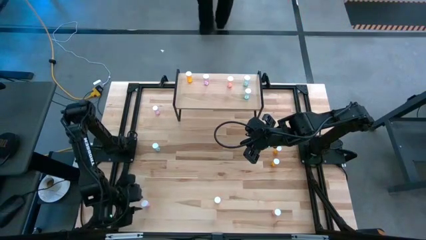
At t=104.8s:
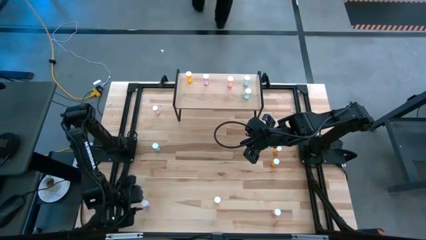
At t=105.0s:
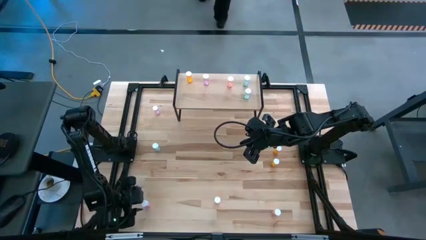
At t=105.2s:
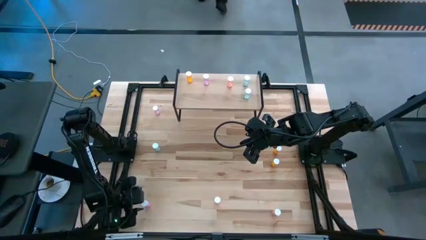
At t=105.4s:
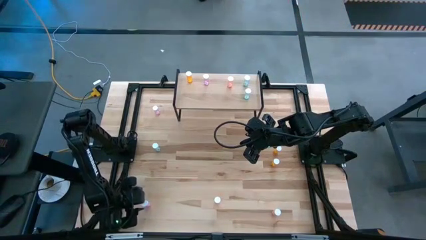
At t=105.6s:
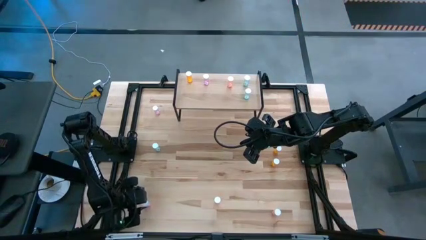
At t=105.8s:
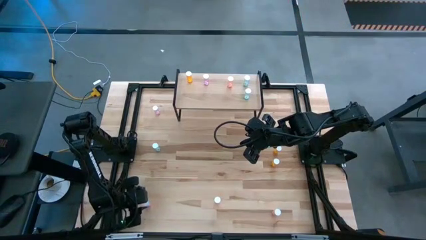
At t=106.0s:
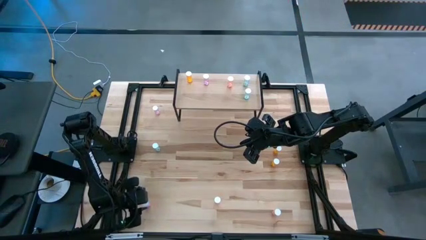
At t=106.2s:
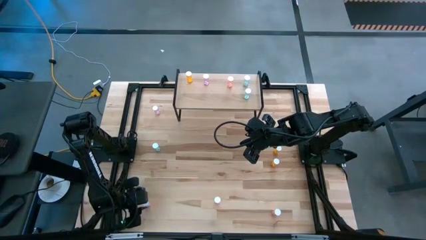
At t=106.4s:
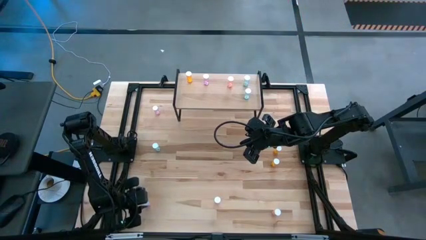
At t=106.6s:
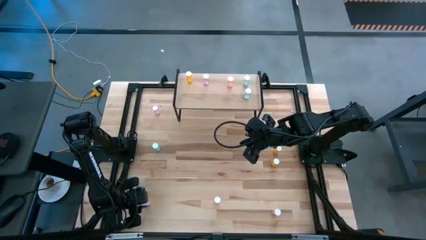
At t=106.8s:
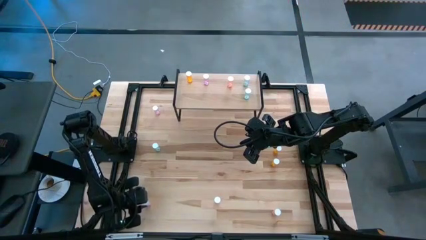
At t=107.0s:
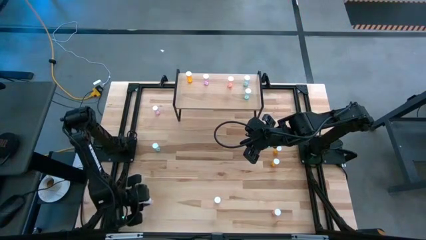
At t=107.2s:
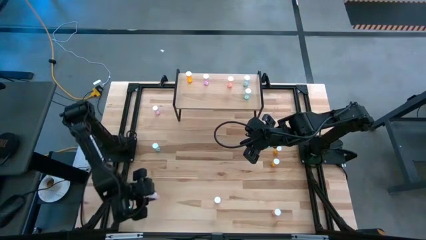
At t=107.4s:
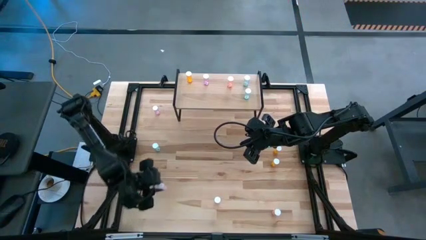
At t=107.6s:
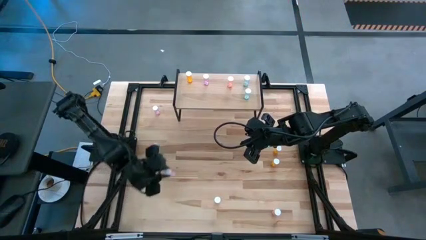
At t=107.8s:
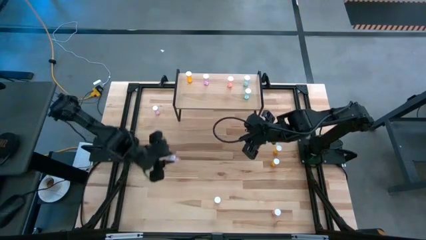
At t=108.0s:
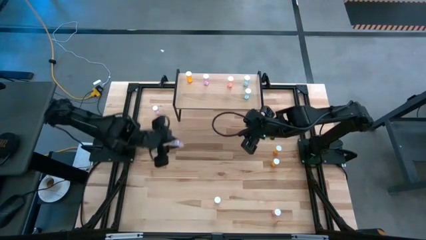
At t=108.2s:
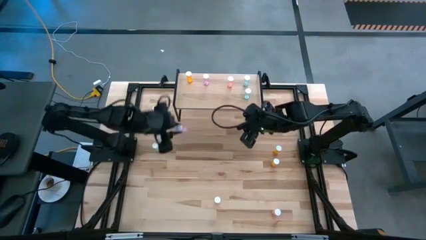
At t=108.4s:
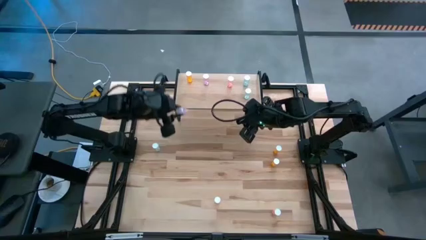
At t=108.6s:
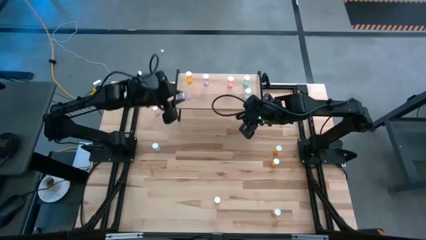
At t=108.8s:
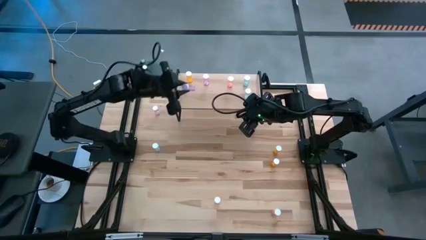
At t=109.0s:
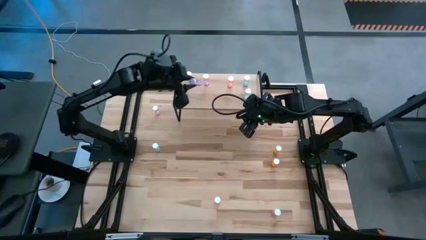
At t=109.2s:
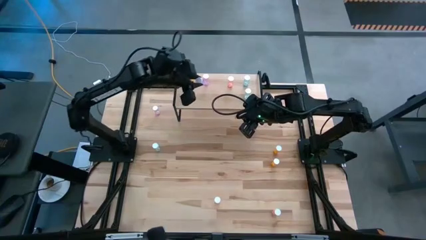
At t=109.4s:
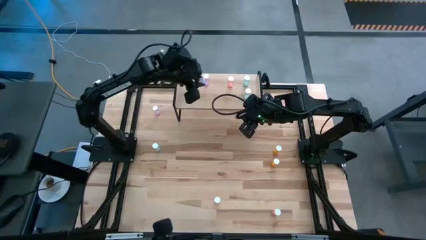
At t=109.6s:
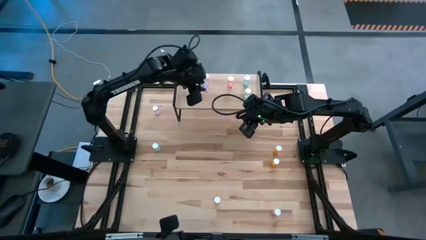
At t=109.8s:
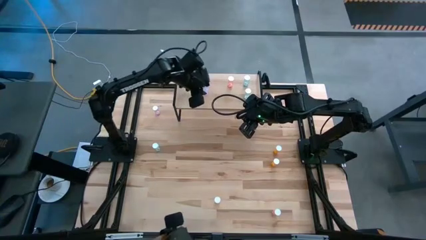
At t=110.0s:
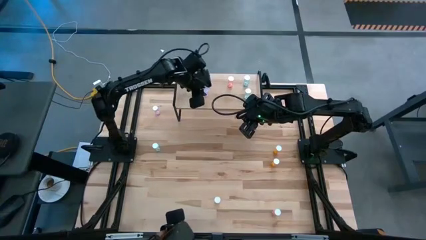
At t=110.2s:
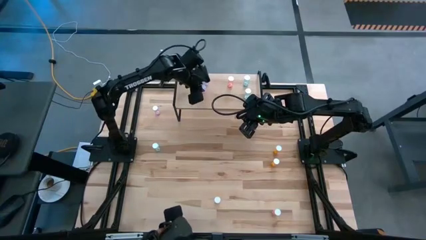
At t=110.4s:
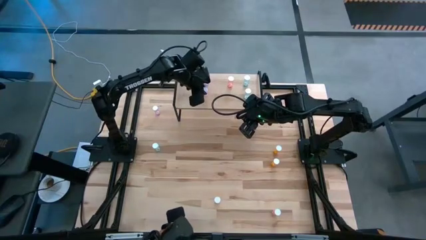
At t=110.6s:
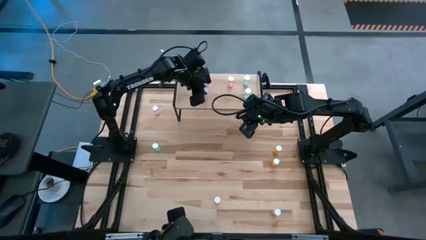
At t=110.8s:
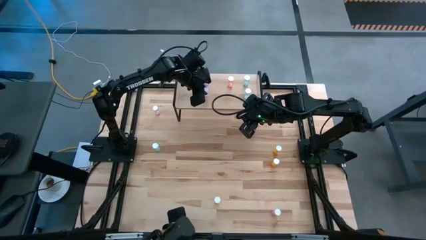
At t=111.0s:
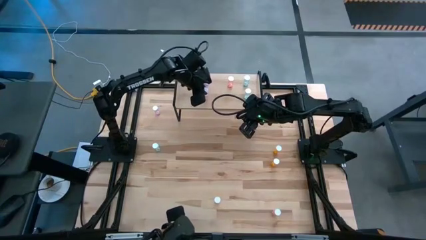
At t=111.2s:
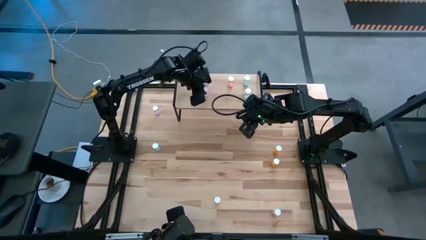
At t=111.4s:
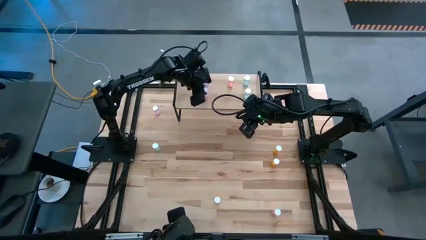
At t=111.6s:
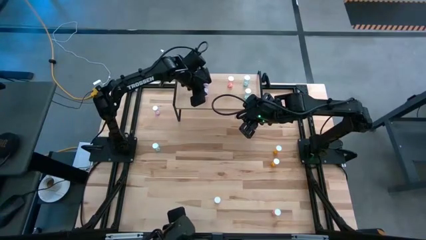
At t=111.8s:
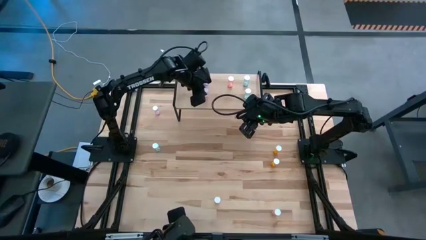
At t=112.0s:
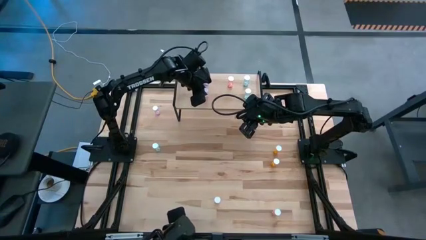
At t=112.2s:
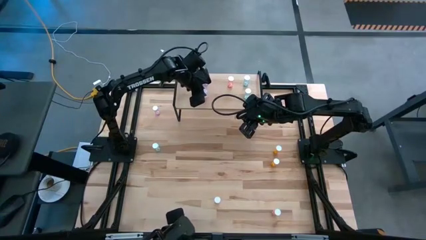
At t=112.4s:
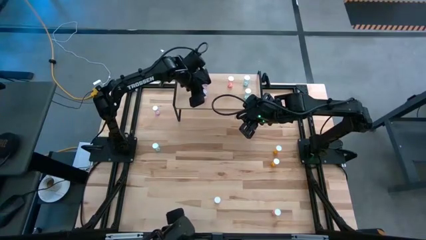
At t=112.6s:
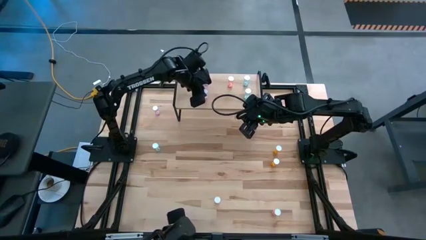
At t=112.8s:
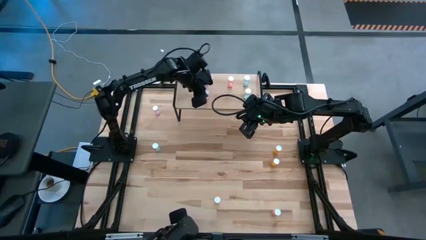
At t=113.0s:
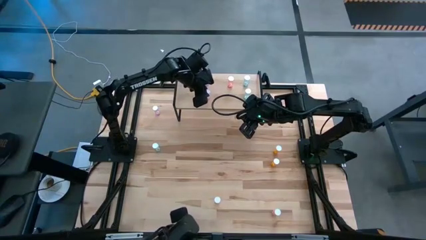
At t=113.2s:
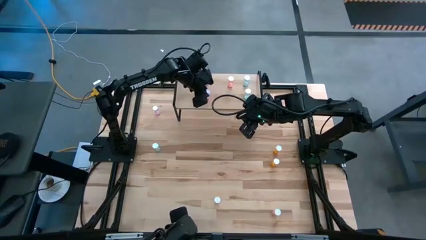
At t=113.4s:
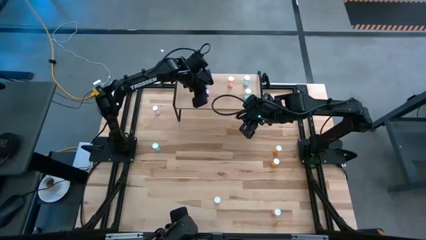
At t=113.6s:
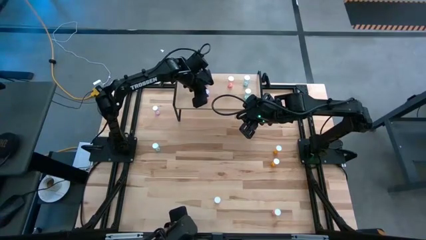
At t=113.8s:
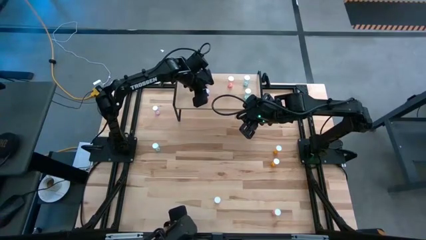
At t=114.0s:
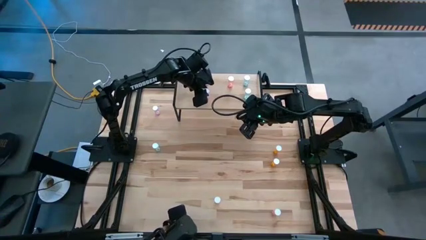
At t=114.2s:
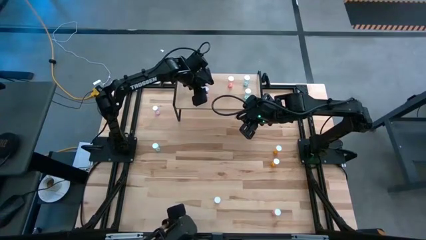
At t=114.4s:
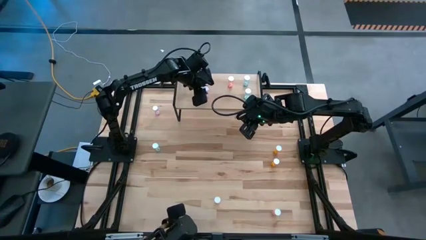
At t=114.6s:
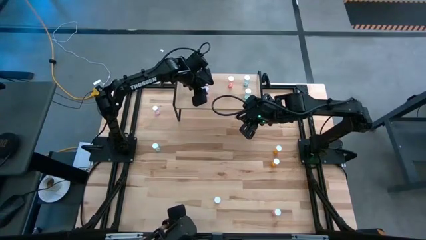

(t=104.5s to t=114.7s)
Task: Pick and place medicine bottles onto shelf by color
Put the bottom purple pill bottle on the shelf aligned with the other purple pill bottle
